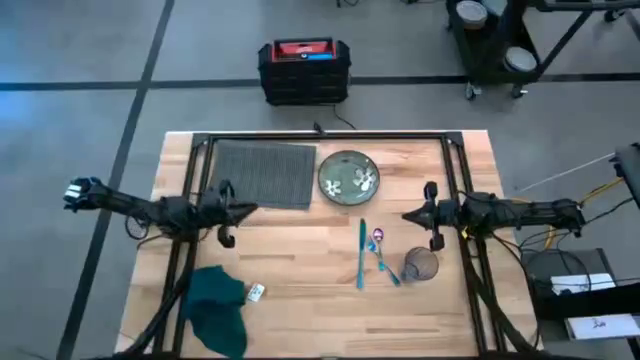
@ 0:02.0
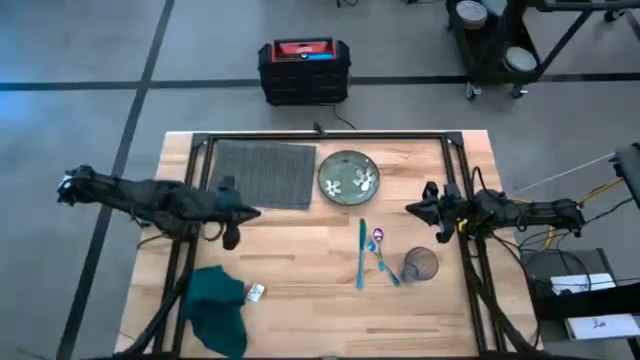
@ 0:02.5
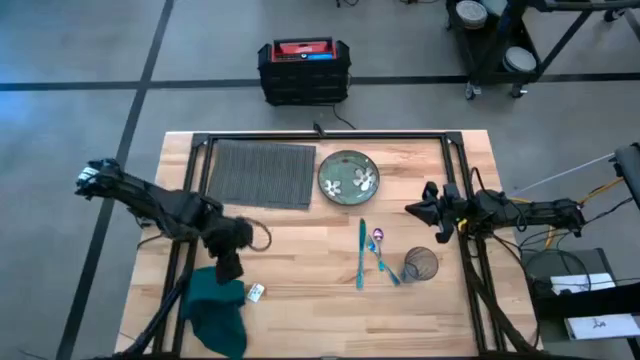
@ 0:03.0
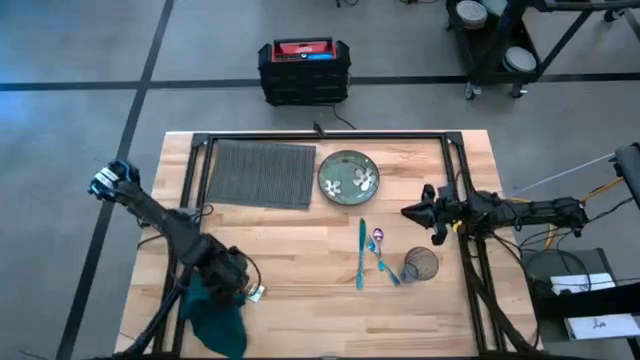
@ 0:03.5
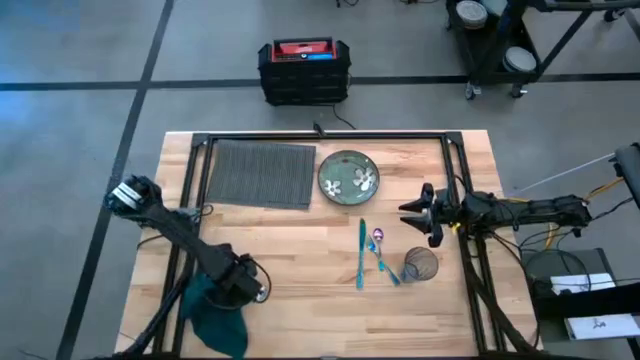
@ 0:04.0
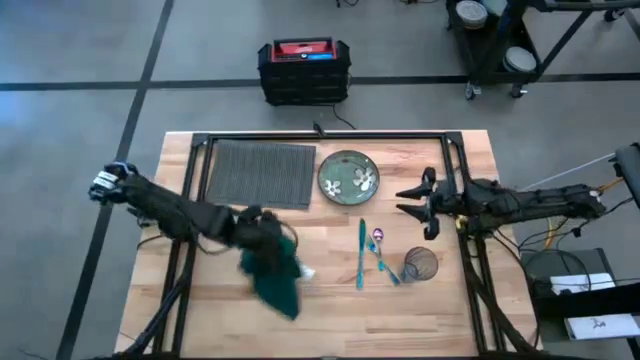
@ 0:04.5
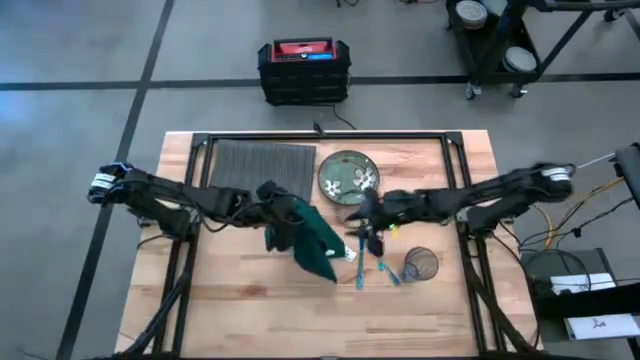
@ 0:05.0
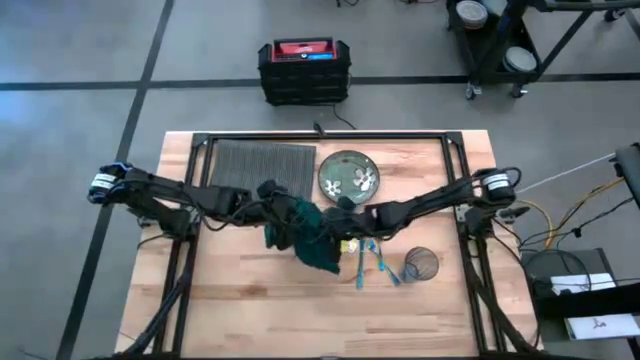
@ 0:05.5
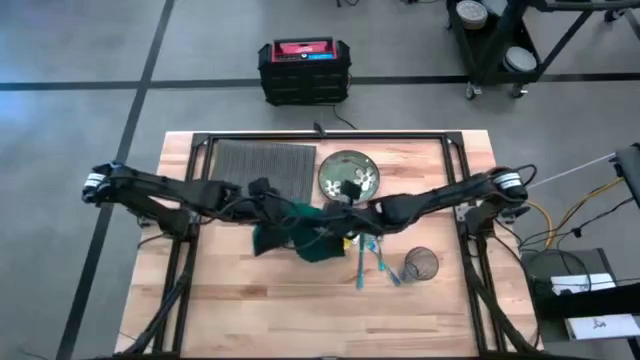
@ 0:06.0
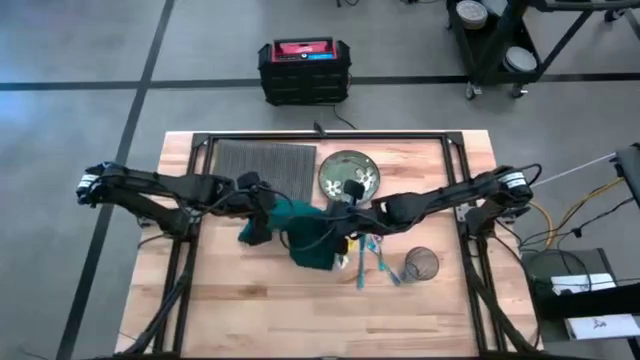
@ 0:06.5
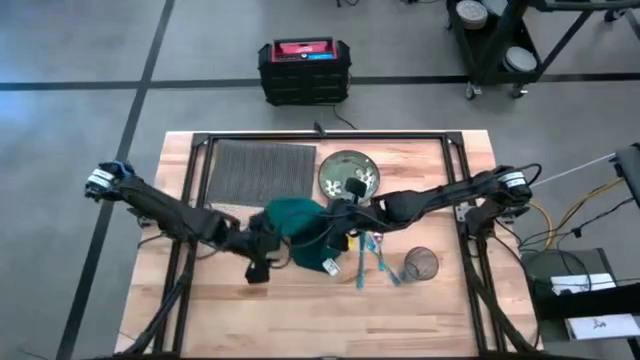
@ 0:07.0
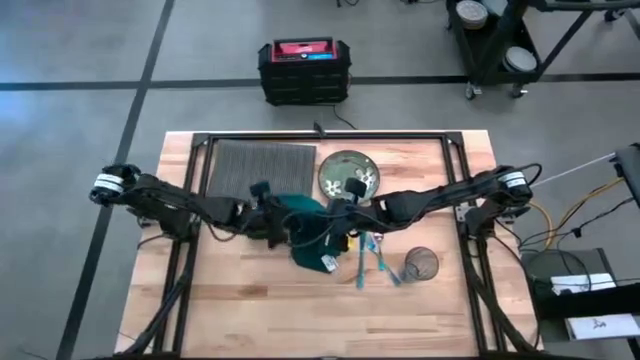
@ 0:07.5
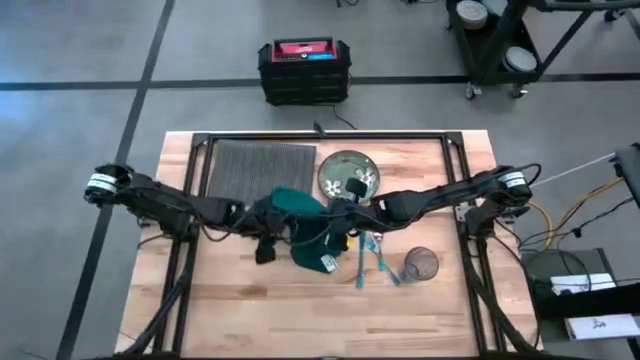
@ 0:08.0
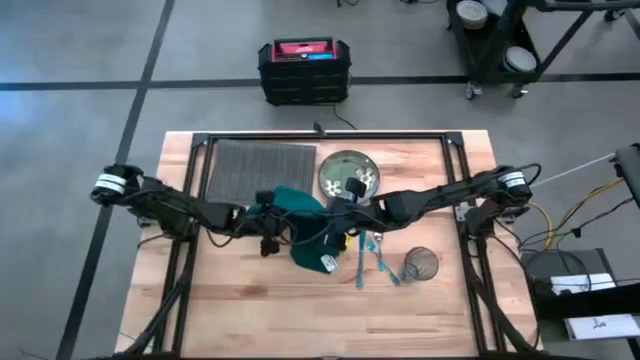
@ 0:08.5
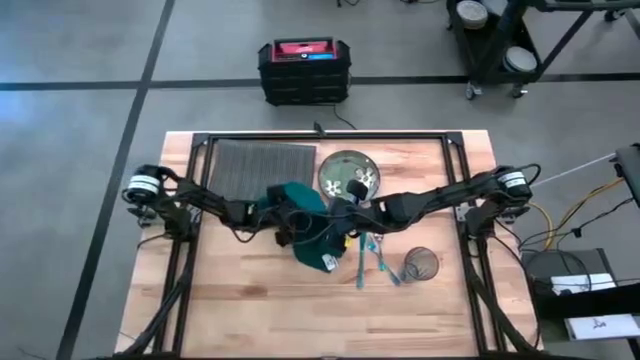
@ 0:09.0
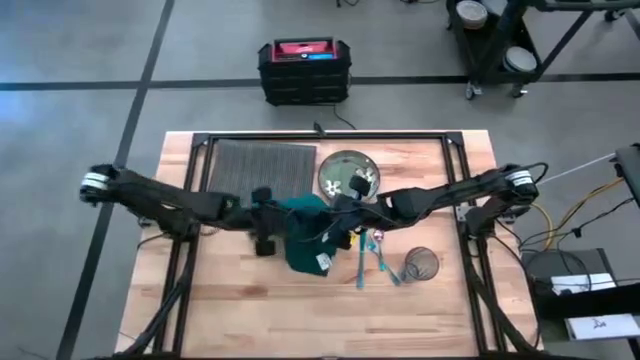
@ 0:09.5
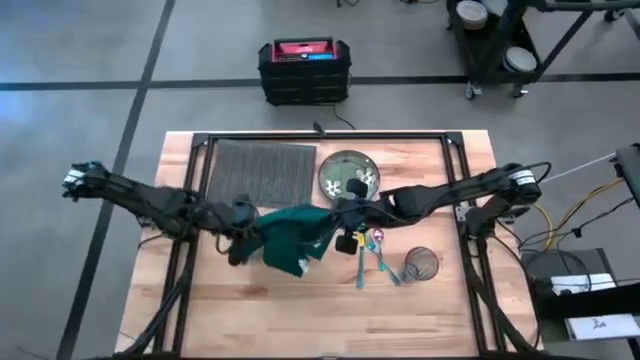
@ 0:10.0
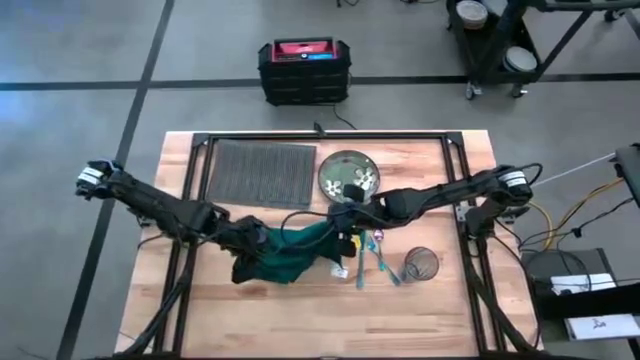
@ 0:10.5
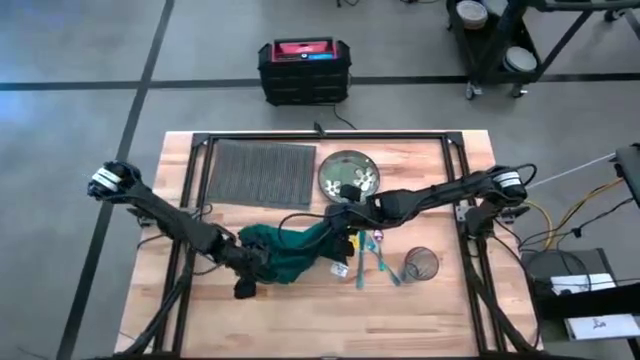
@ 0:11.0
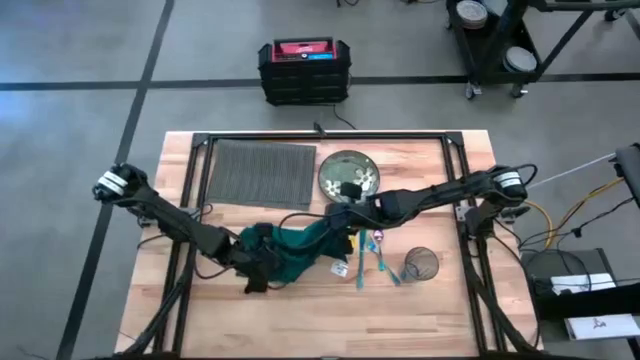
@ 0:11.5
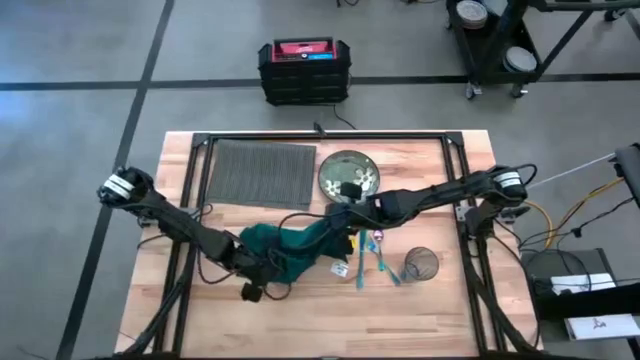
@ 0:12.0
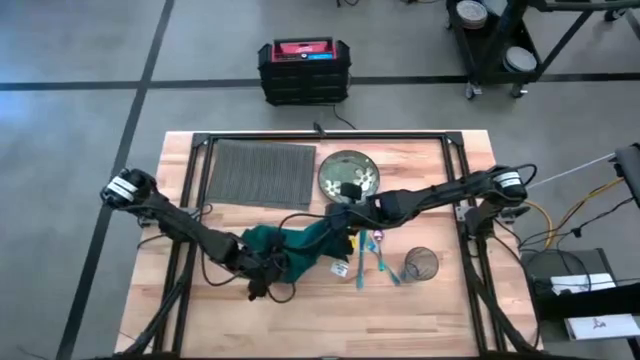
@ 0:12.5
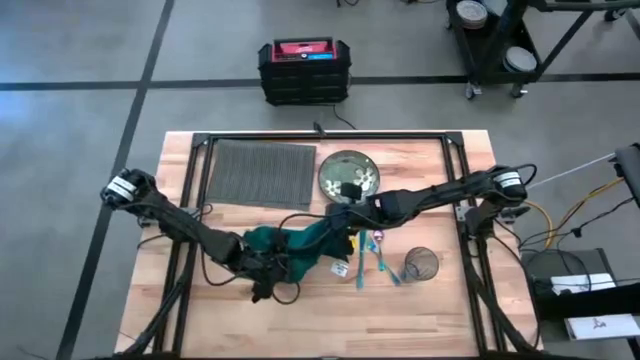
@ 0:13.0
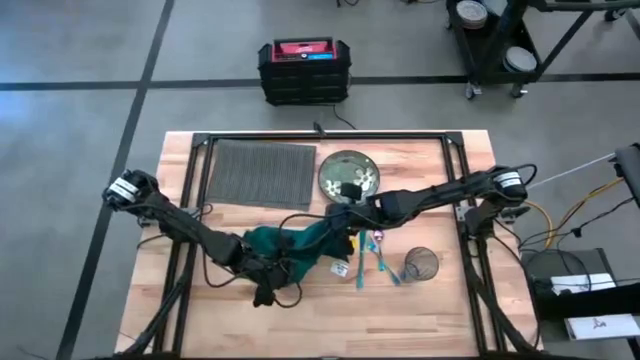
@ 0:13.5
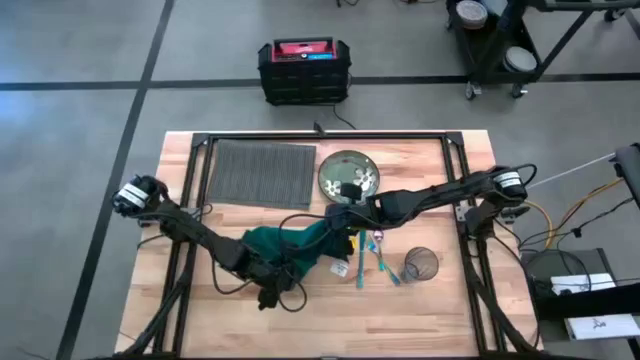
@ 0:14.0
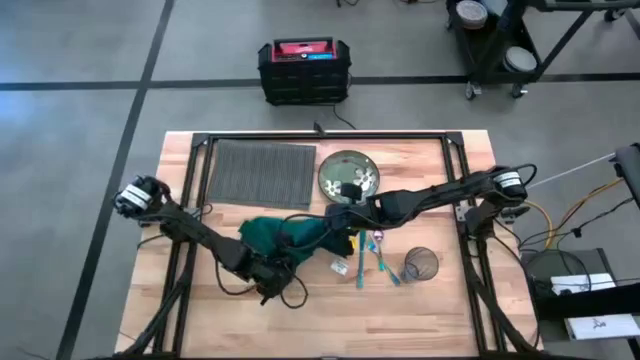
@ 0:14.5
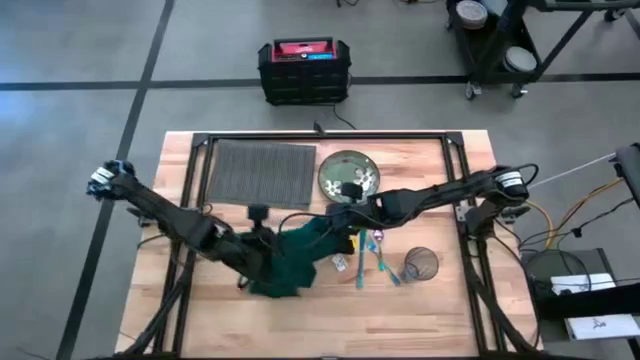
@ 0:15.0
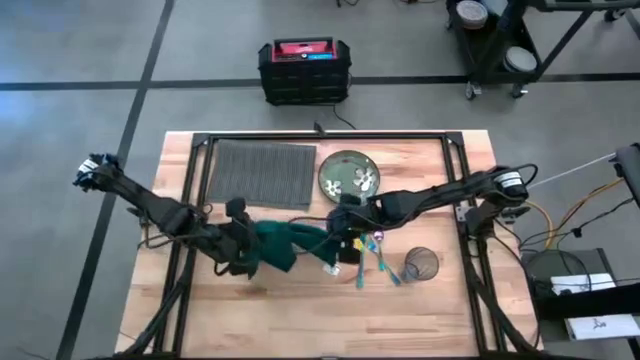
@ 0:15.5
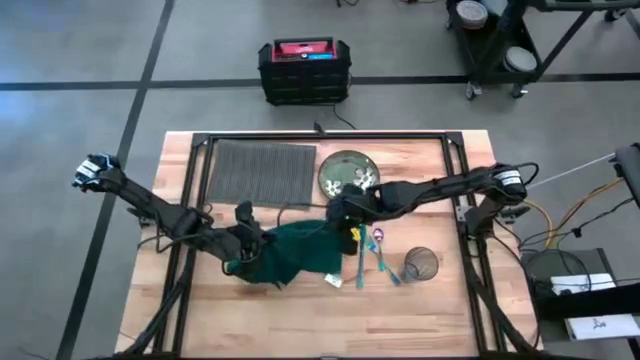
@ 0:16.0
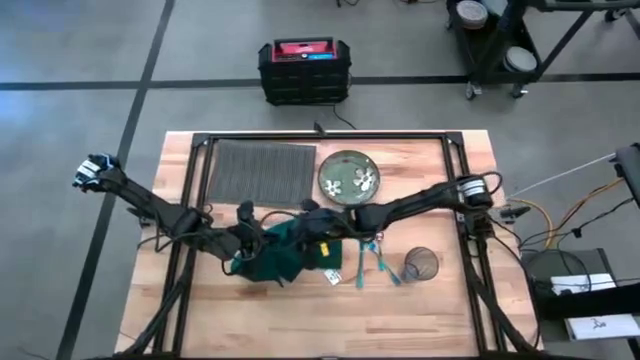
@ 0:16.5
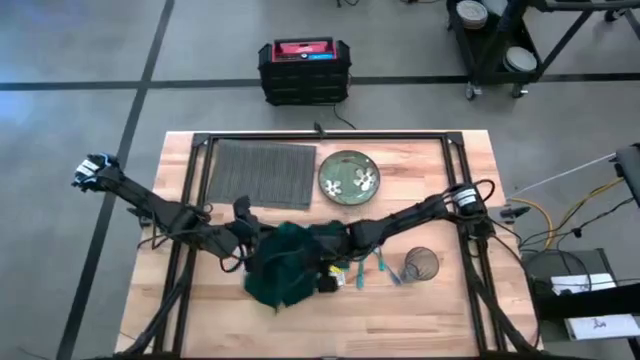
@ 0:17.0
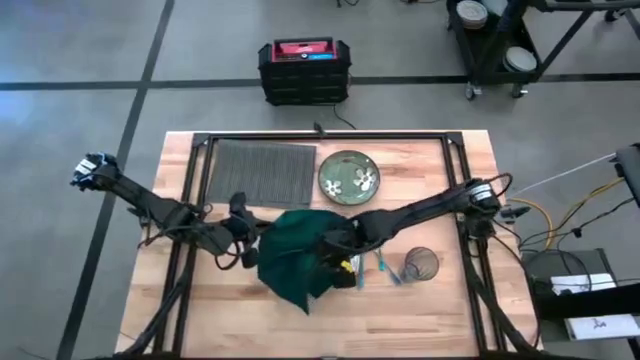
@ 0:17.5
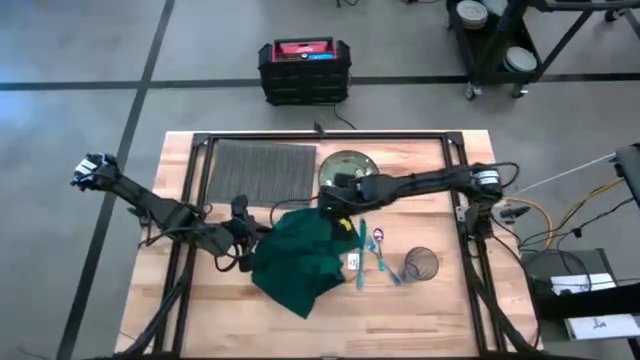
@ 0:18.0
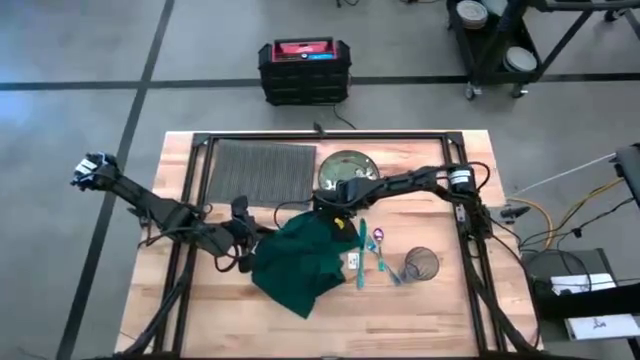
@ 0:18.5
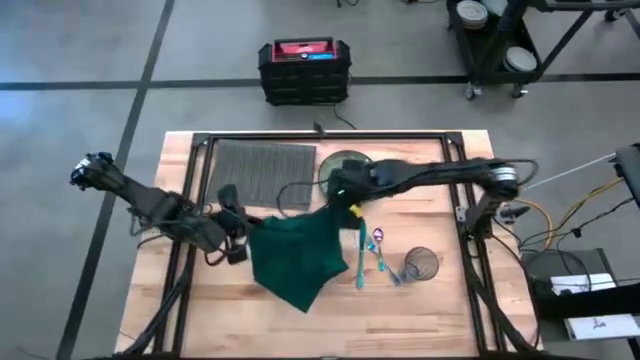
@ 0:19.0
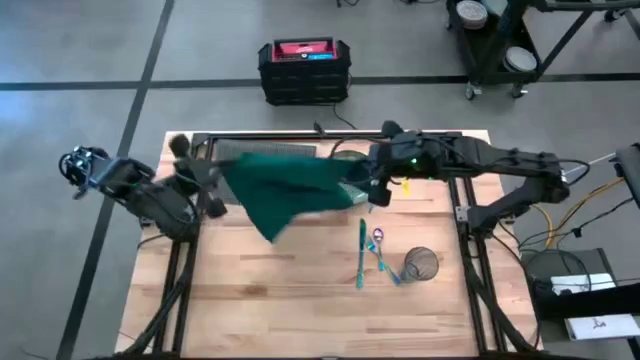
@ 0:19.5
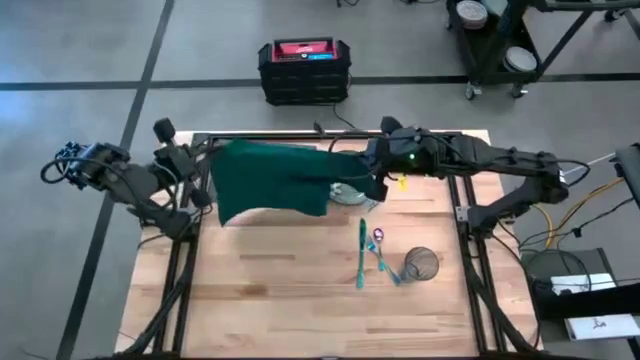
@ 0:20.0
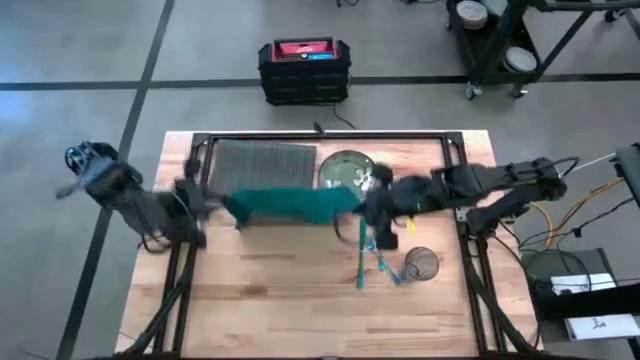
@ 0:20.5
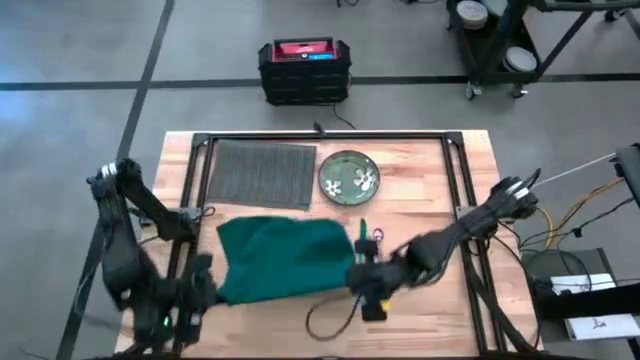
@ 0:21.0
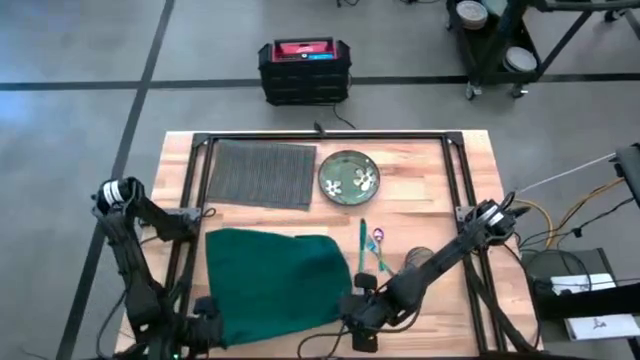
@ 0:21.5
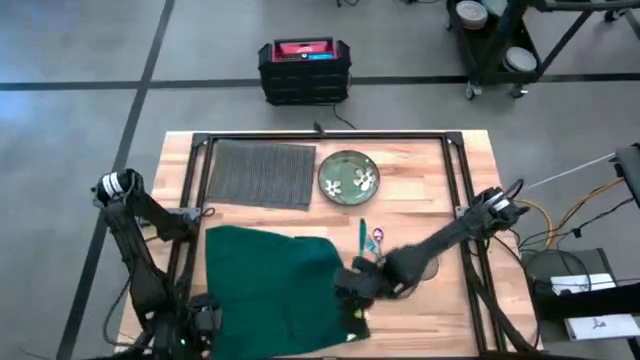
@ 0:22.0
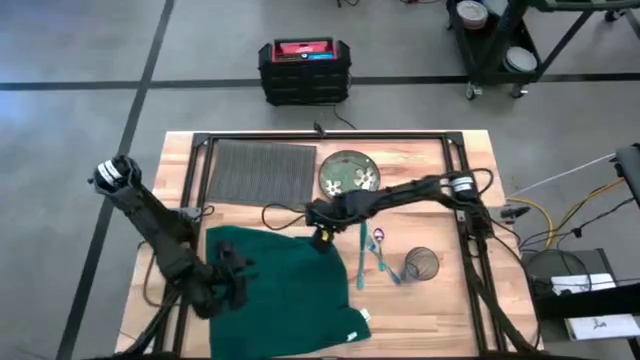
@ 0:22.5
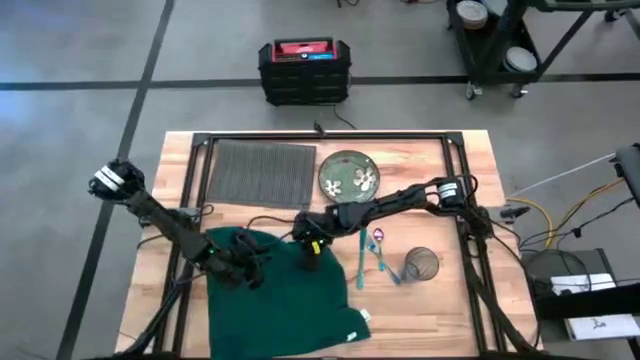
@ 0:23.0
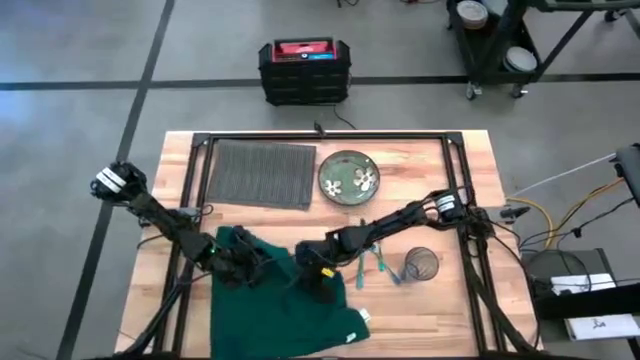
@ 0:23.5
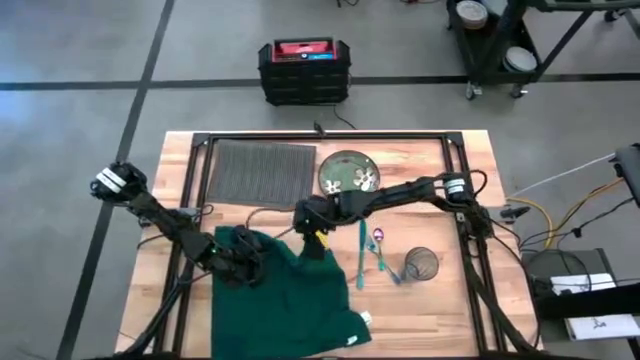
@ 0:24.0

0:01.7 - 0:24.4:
Task: Set table place
Fold the green napkin
